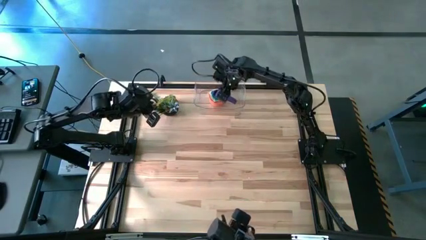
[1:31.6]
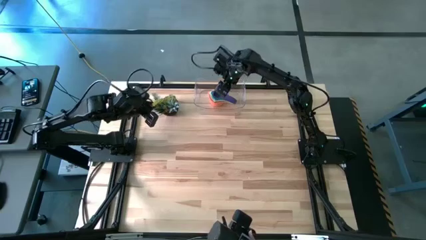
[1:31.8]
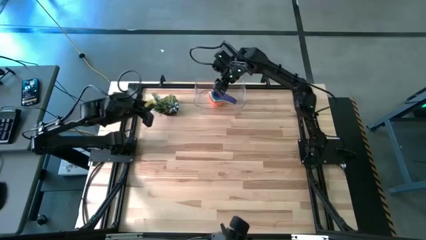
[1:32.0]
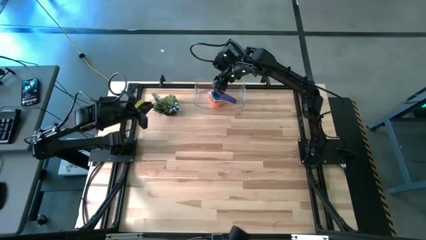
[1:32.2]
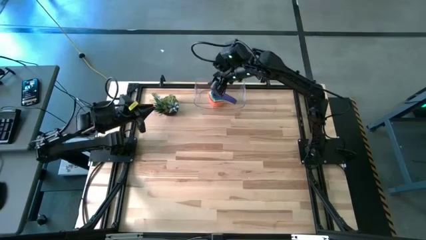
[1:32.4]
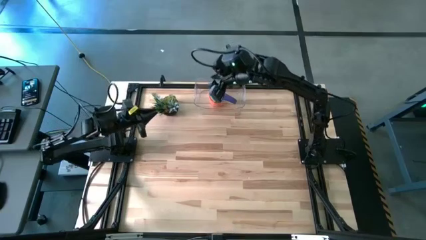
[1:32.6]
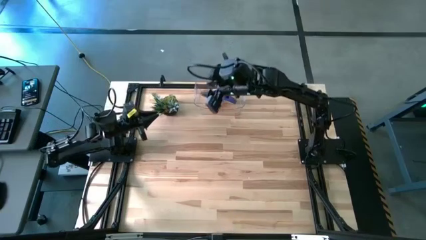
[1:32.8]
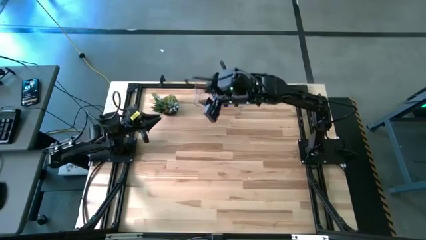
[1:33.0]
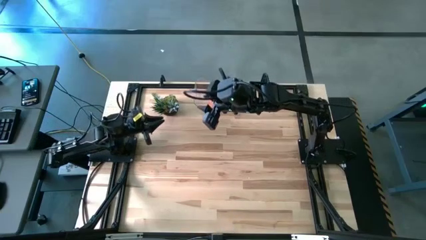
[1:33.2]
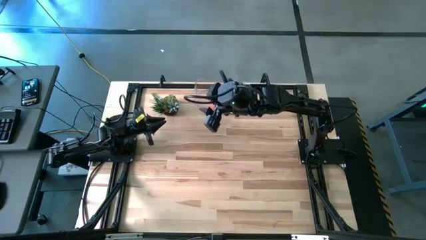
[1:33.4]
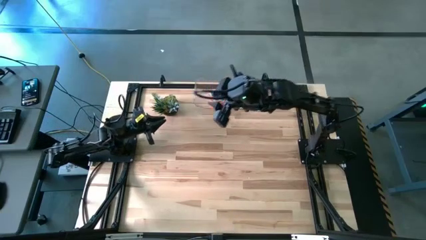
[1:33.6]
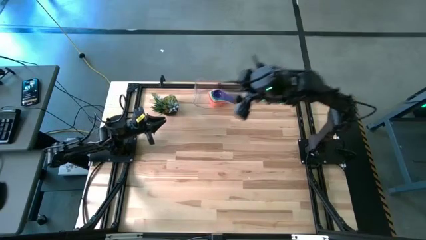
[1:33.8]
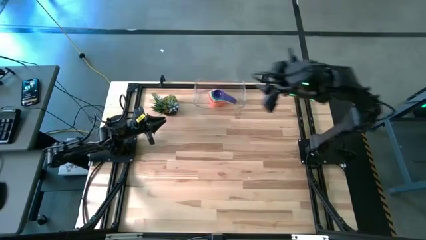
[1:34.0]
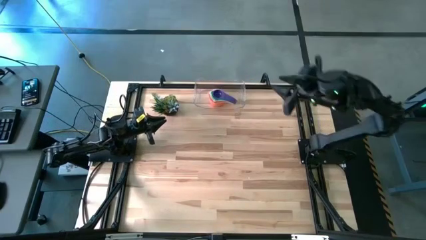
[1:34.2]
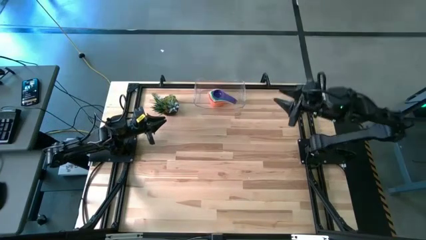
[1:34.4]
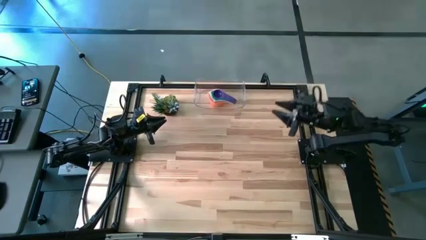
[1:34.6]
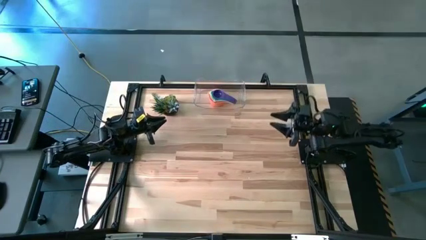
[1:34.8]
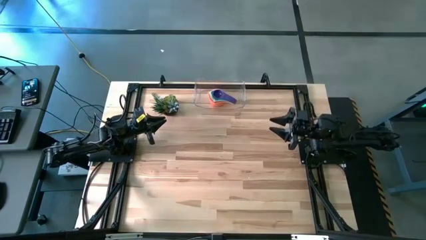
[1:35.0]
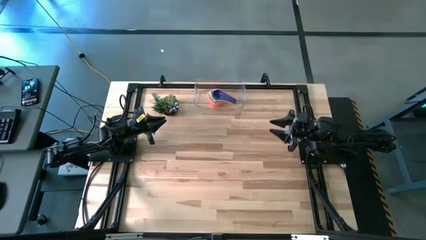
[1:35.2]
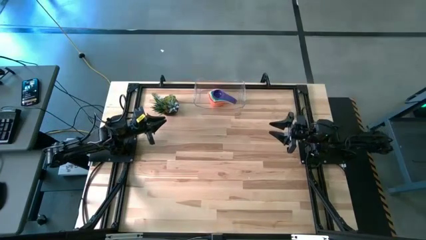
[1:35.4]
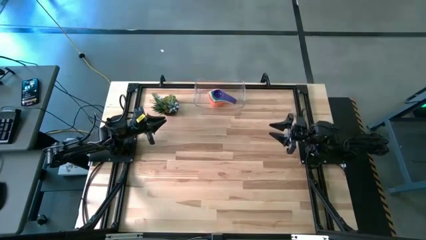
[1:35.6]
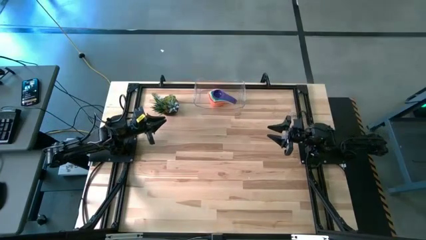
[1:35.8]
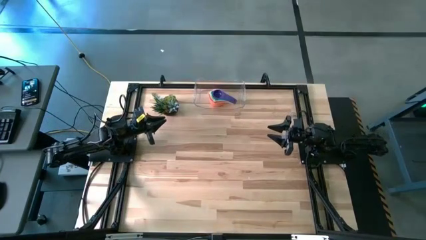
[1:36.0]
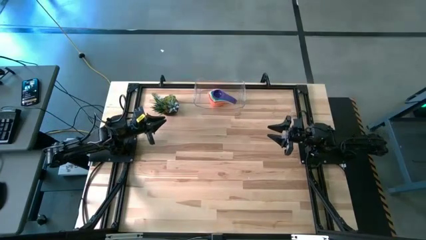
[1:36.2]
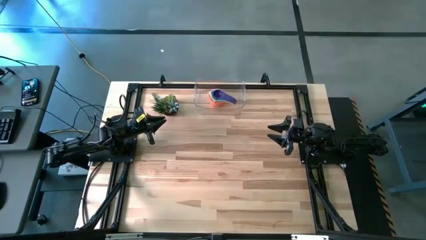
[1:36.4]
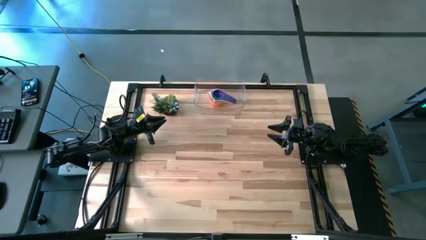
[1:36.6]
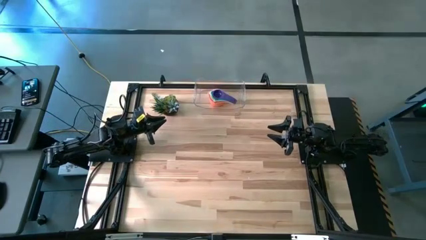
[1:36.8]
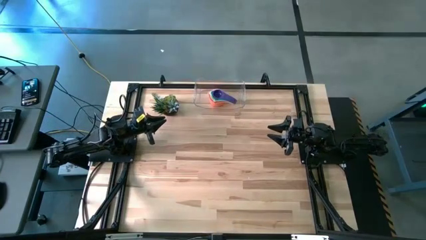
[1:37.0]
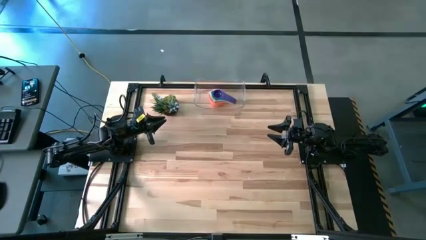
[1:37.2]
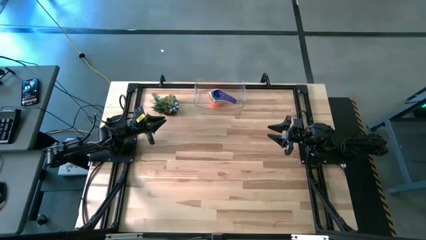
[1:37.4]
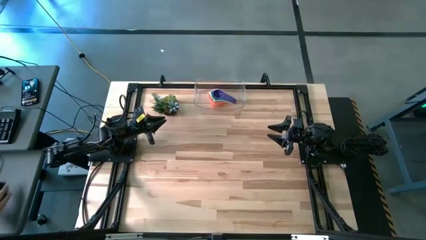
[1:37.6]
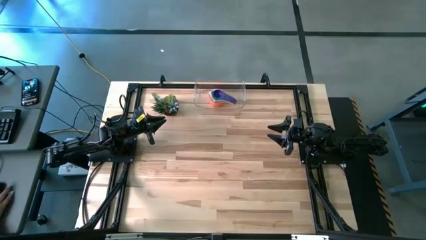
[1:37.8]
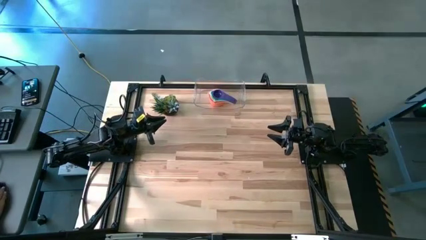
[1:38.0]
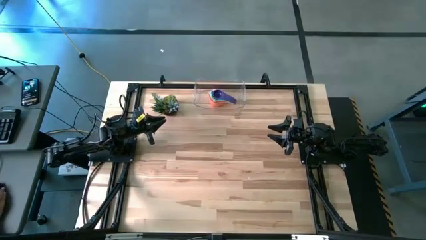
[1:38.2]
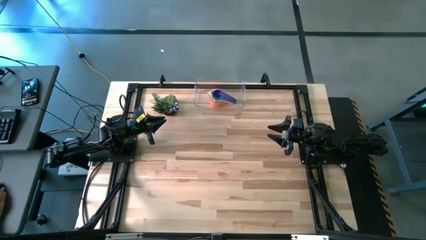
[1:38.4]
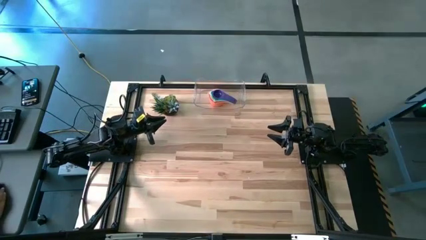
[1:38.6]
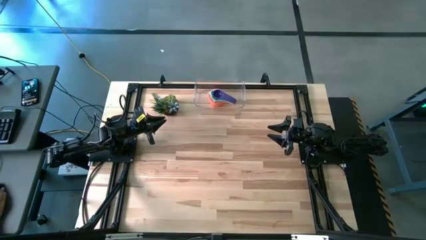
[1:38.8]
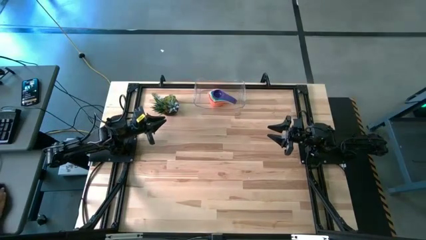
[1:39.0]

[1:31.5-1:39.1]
Task: Nest measuring cups in basket
Return to Home Position

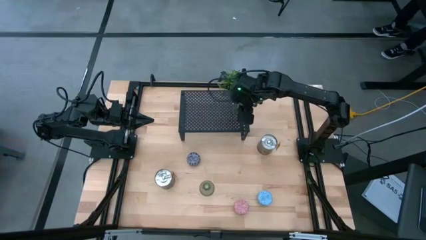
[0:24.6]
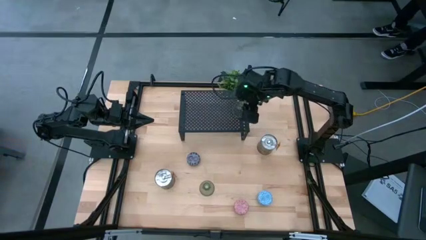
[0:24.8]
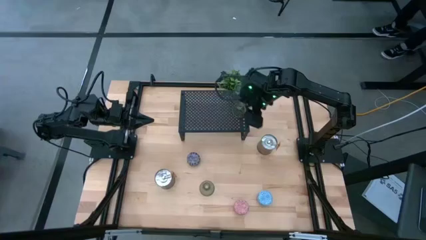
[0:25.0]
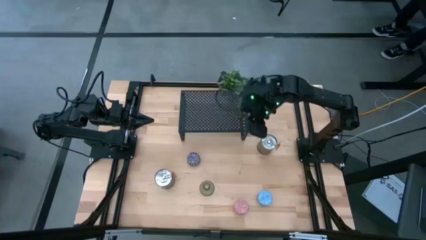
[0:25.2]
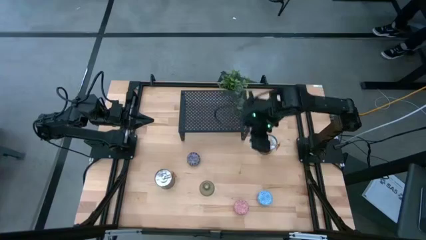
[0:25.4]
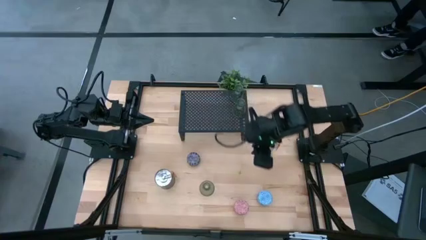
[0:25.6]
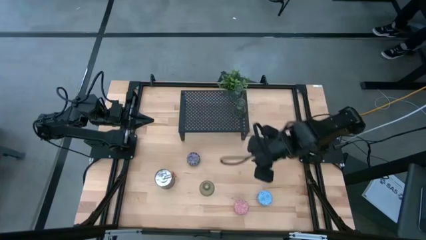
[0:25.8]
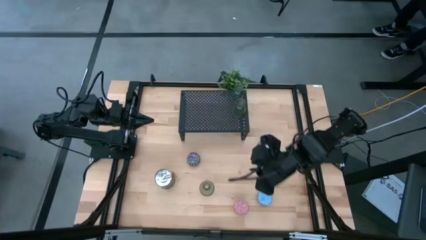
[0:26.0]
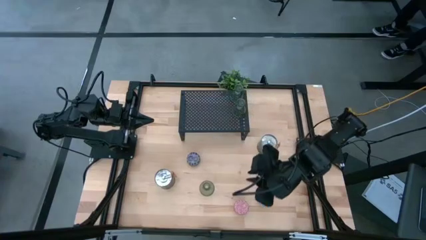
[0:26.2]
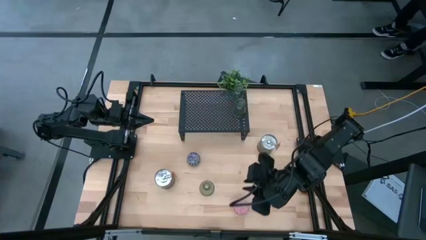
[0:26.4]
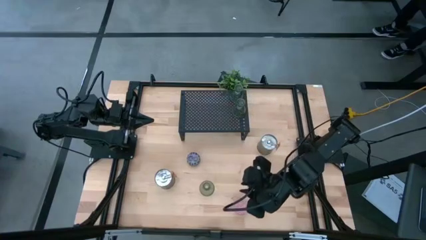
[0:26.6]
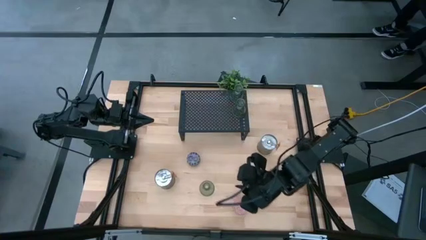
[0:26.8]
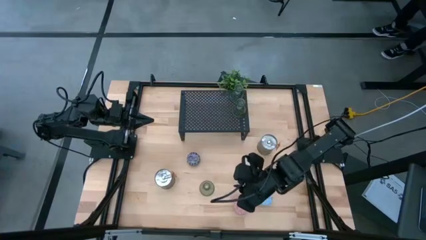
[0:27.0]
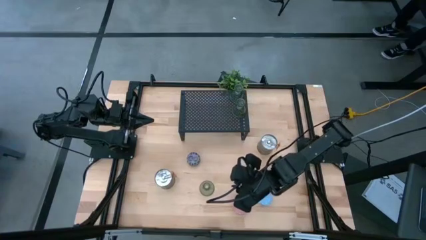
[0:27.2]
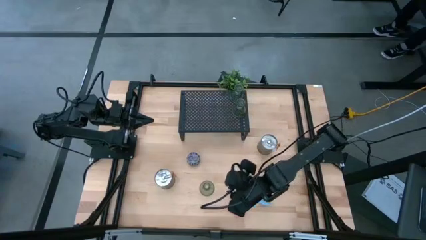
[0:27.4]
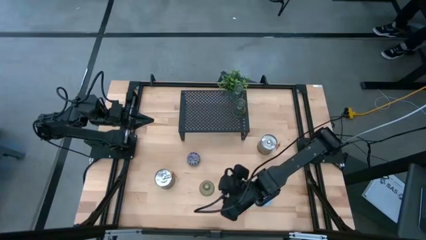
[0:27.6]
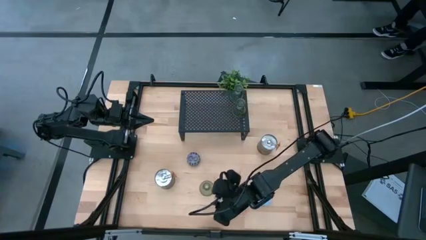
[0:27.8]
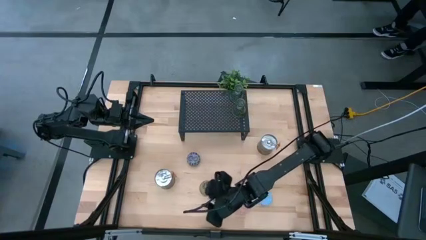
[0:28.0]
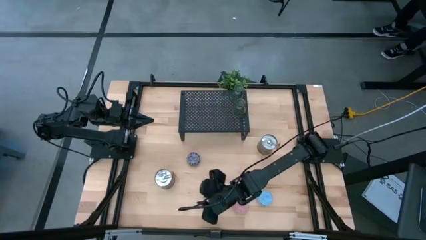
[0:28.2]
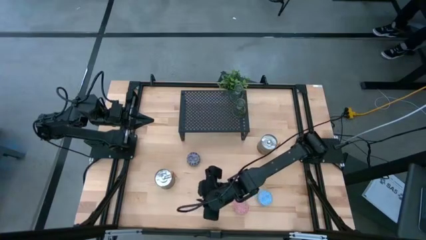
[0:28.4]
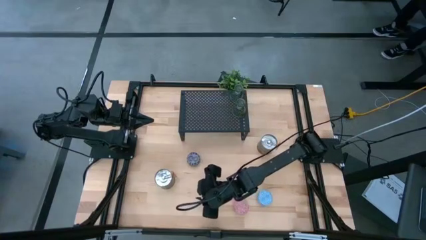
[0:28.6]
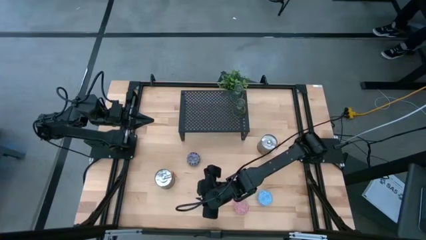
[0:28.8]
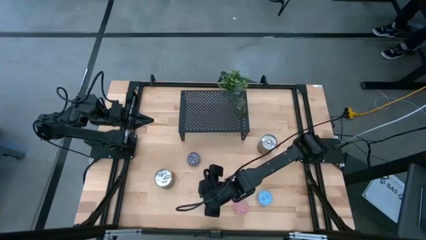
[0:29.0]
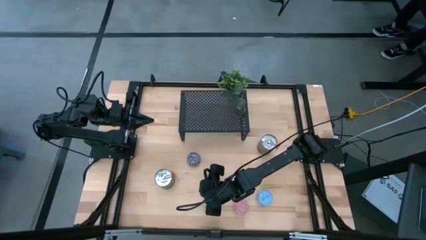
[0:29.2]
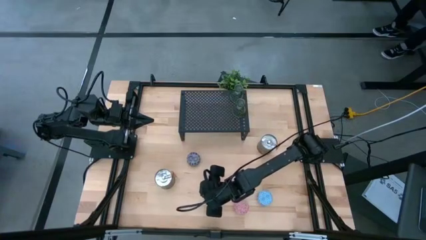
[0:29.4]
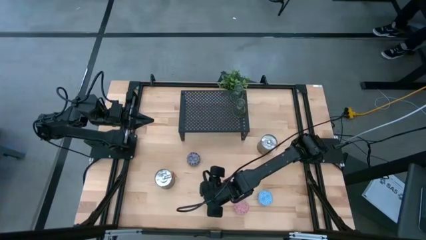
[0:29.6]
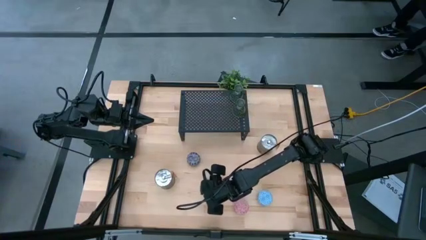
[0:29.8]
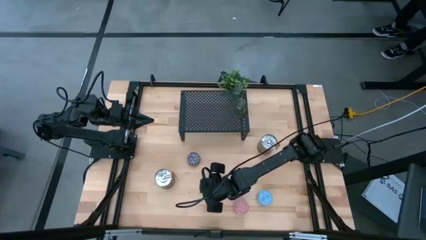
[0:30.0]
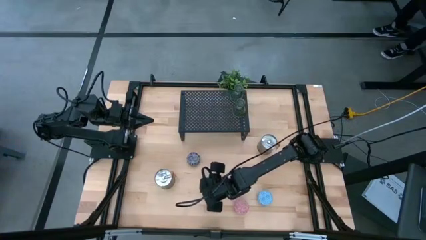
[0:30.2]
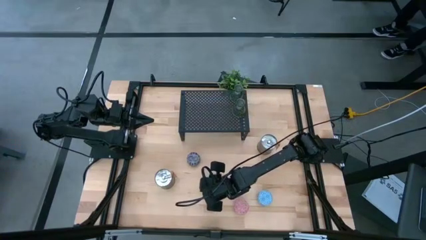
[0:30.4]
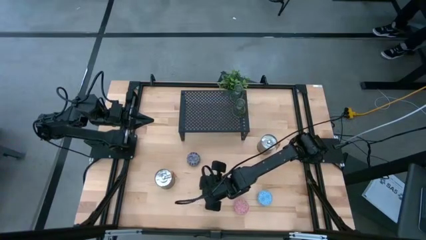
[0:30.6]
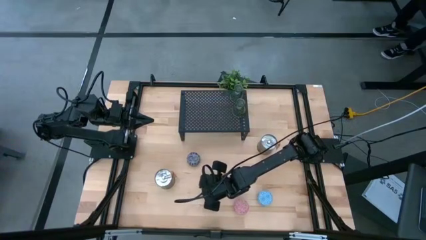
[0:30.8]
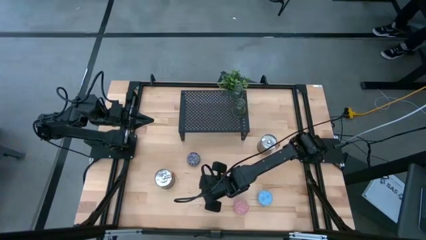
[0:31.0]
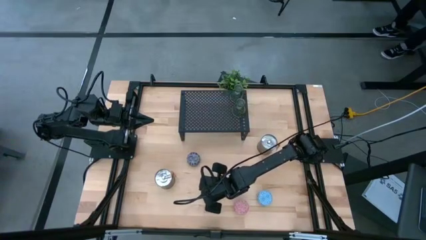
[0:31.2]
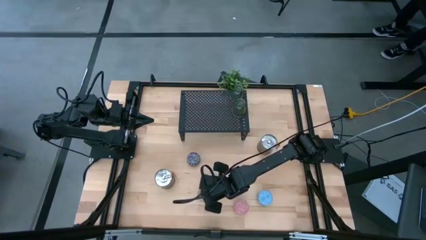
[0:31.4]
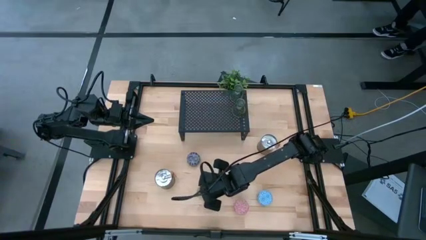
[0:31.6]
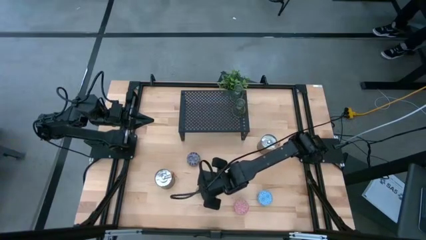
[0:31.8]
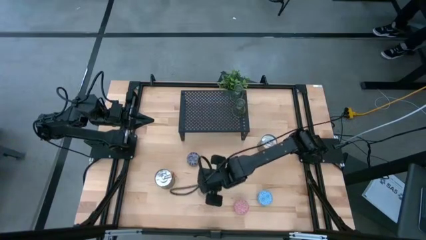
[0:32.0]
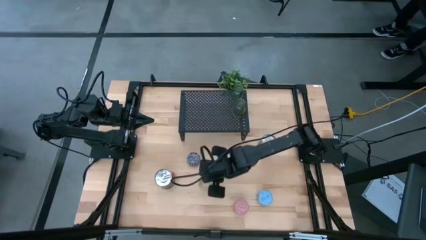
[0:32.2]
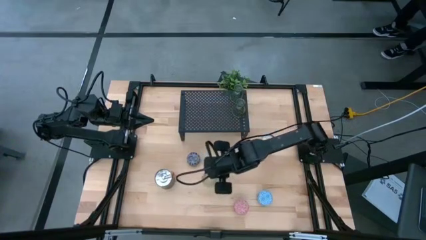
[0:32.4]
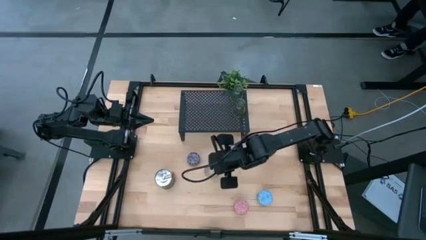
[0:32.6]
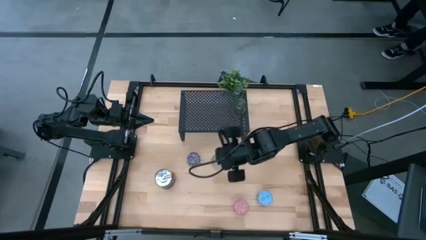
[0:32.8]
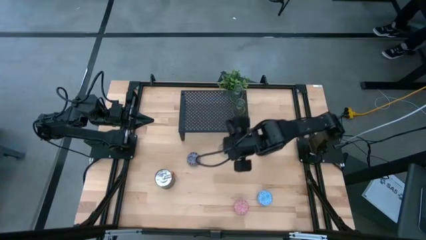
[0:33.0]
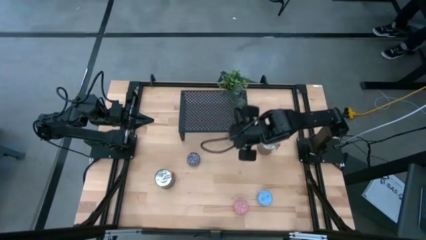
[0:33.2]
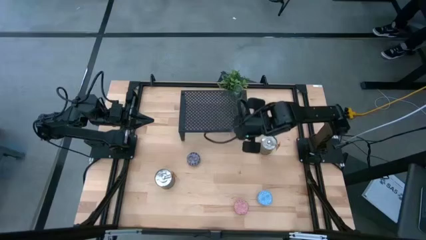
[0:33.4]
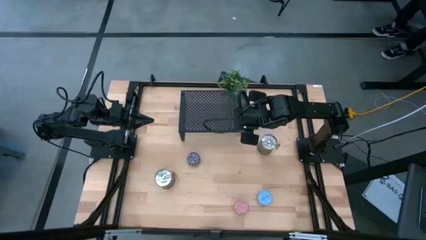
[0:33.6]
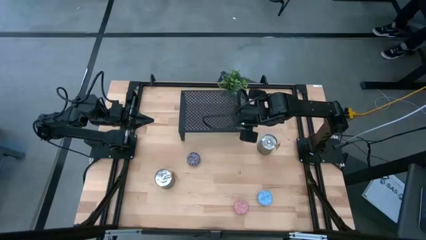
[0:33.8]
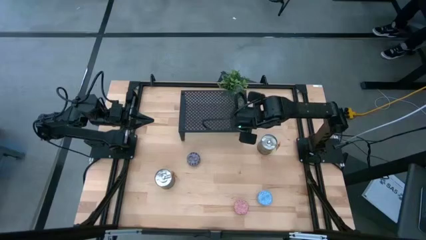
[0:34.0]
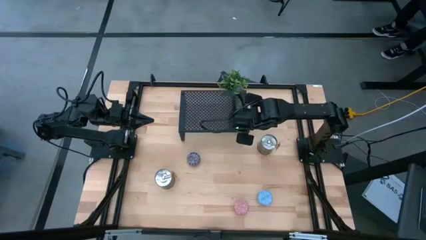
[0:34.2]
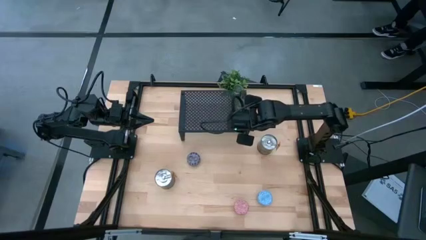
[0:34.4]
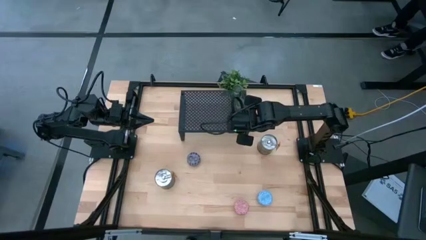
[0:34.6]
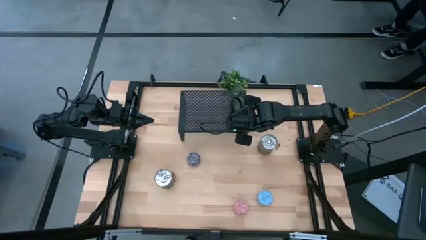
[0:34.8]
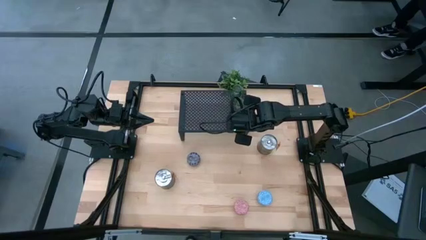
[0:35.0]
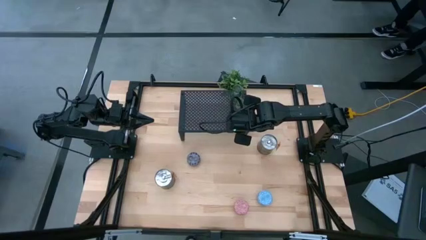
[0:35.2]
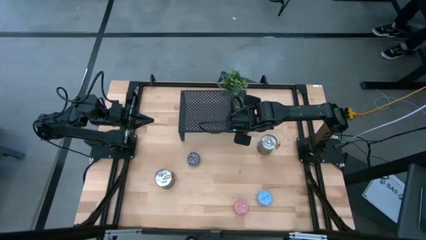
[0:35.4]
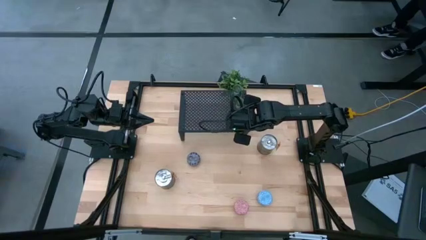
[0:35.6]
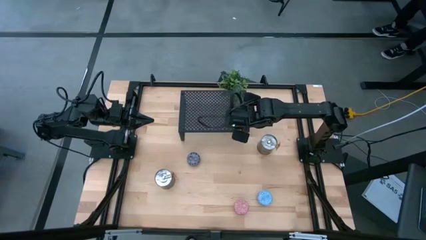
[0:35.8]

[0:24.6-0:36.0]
Task: Pick & Place candle stick holders
Put the transparent glass candle holder aligned with the other transparent glass candle holders on the shelf
